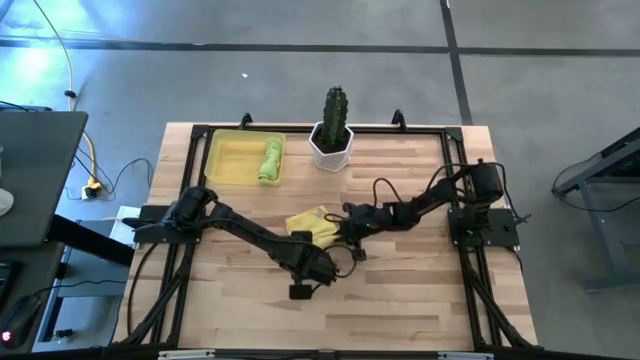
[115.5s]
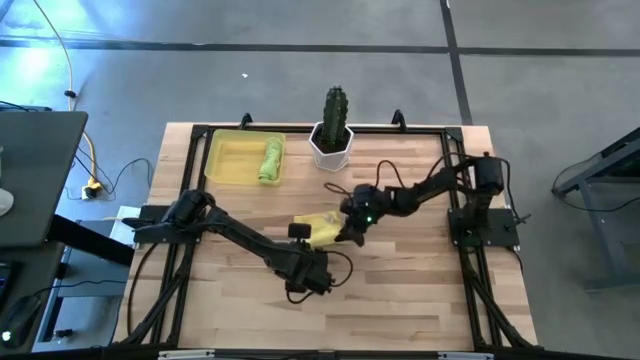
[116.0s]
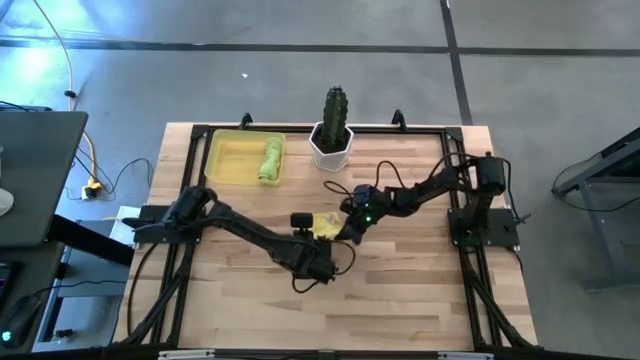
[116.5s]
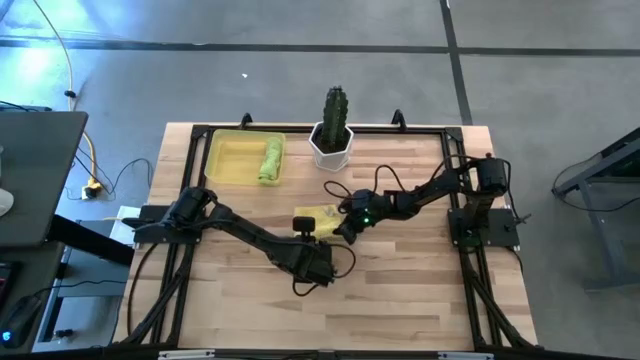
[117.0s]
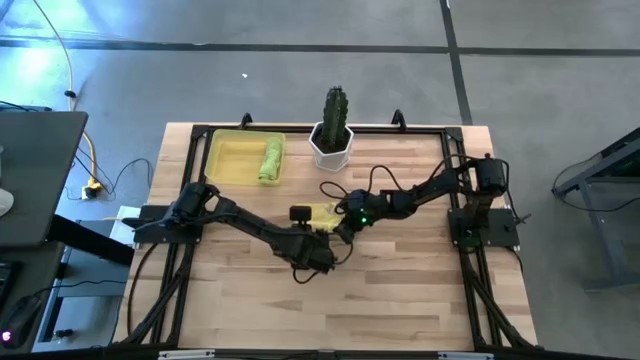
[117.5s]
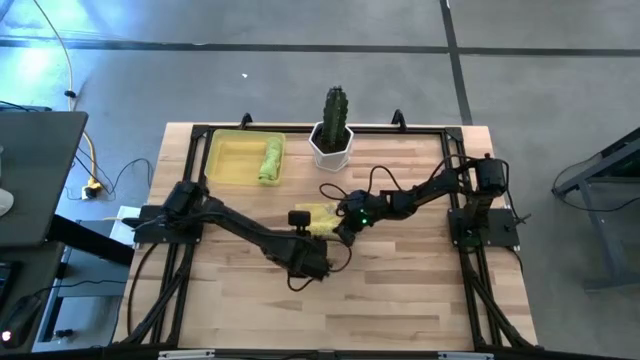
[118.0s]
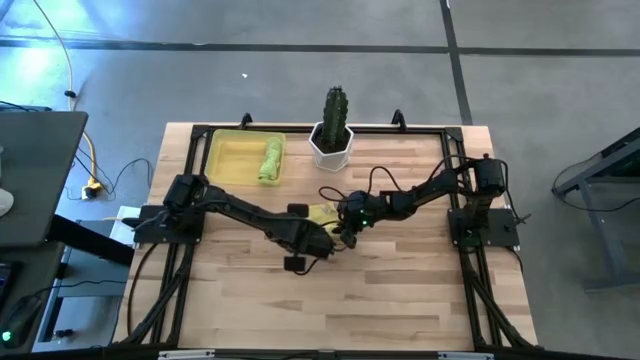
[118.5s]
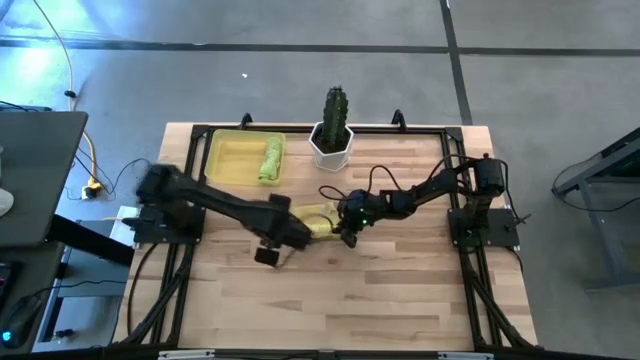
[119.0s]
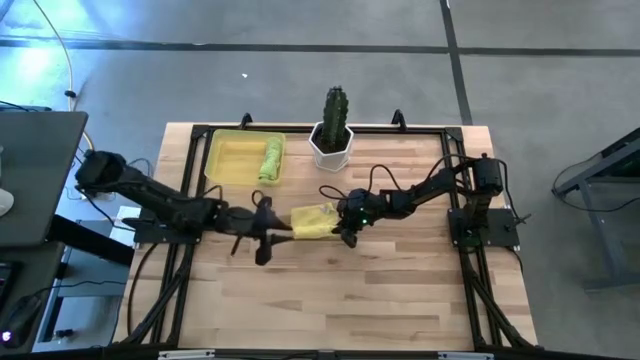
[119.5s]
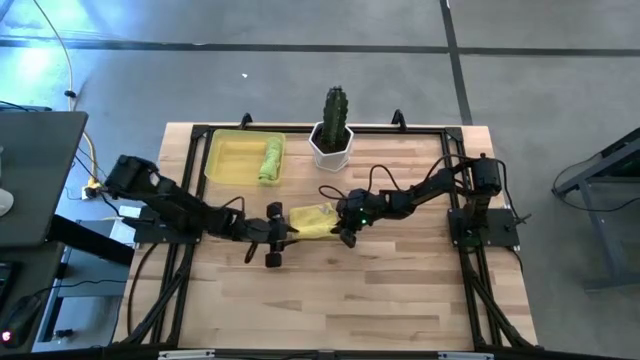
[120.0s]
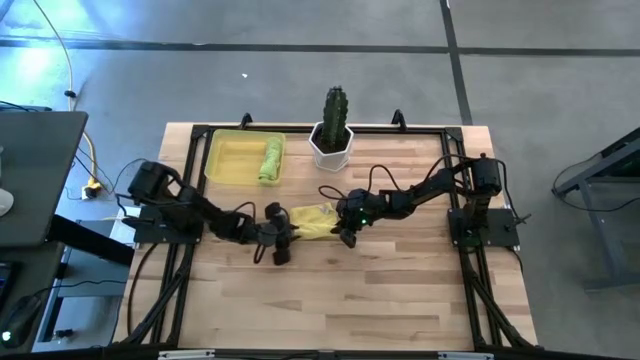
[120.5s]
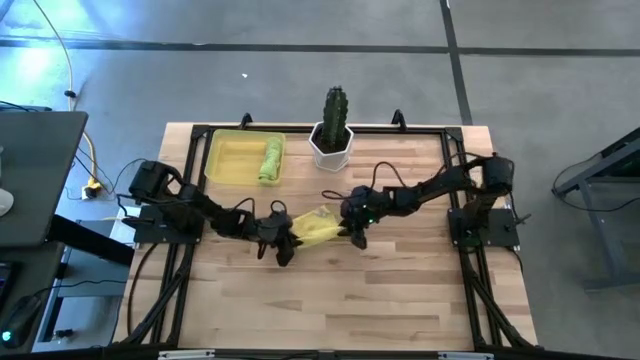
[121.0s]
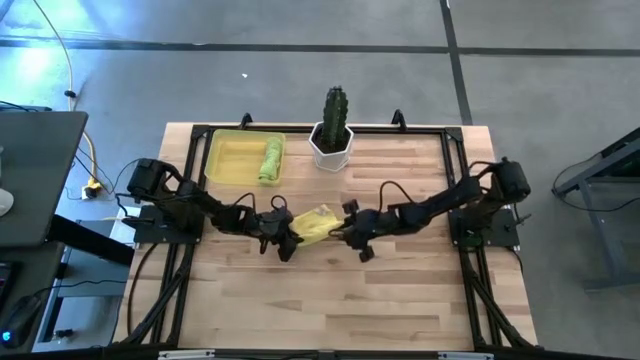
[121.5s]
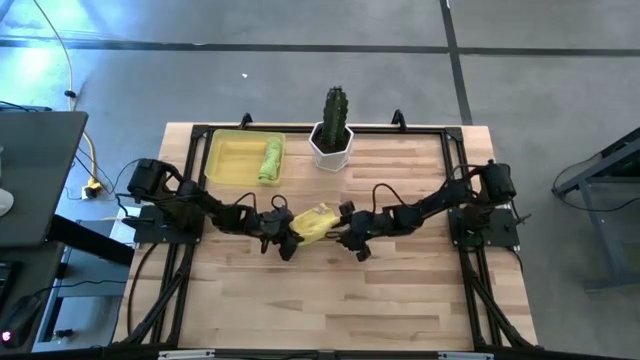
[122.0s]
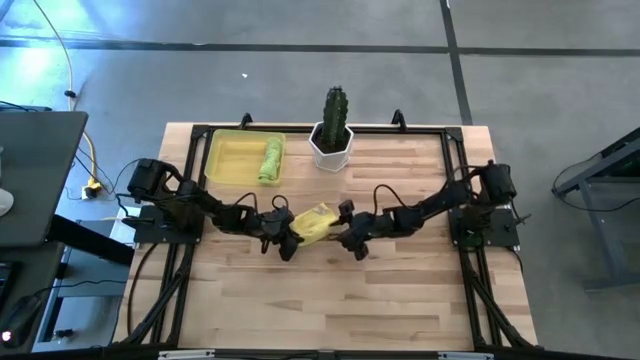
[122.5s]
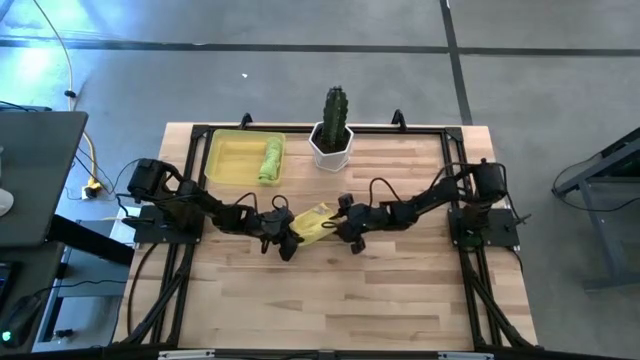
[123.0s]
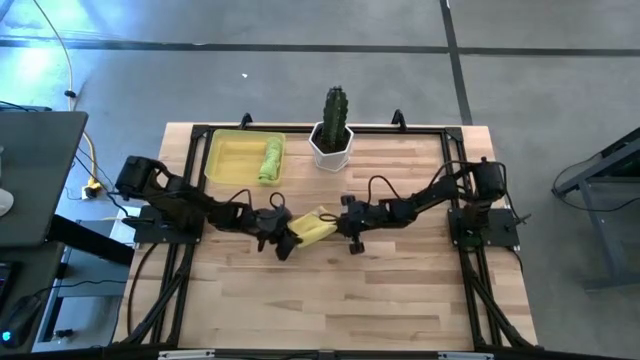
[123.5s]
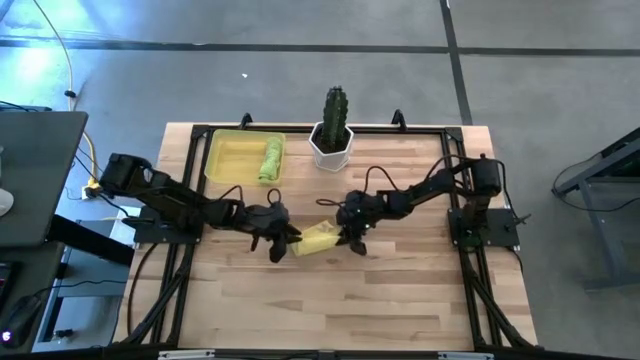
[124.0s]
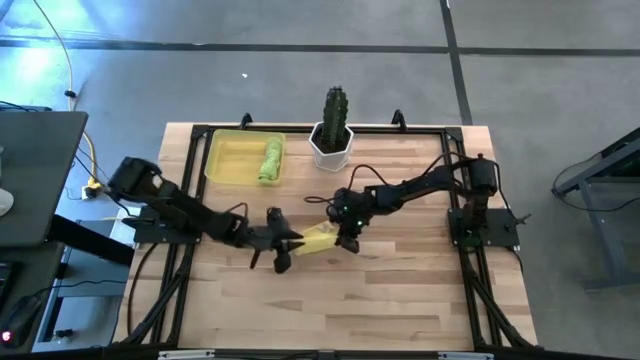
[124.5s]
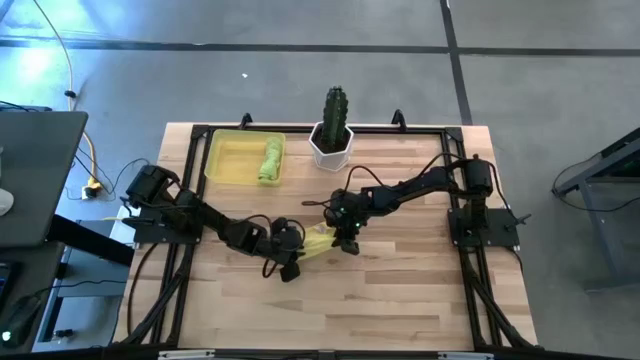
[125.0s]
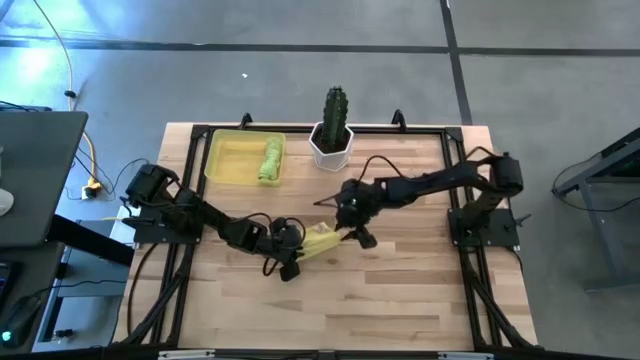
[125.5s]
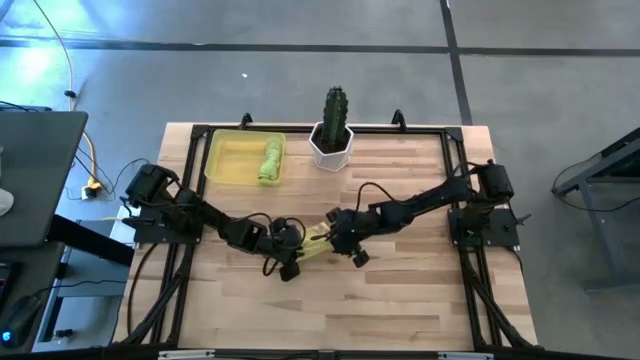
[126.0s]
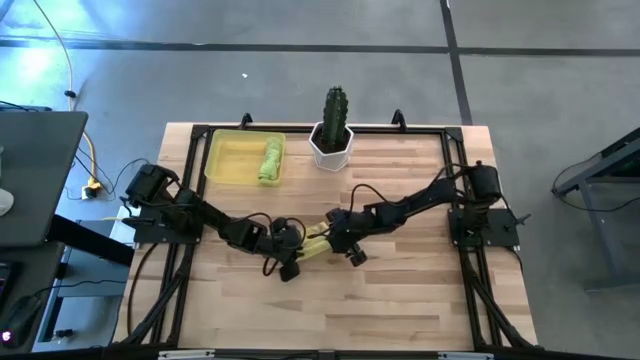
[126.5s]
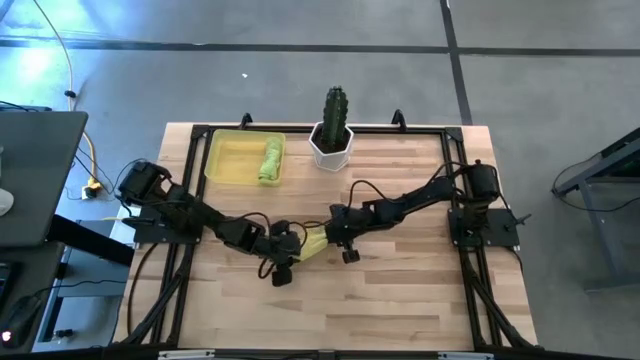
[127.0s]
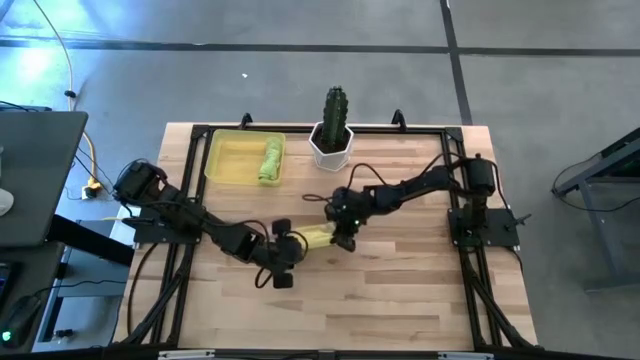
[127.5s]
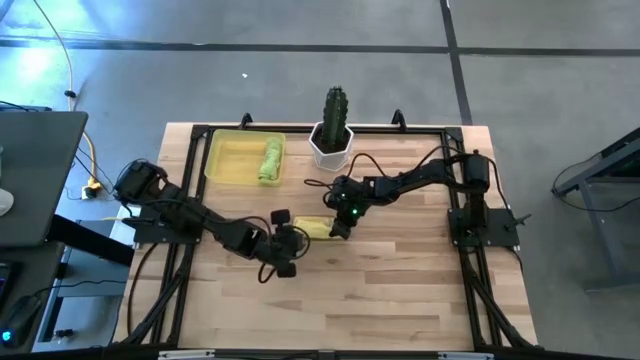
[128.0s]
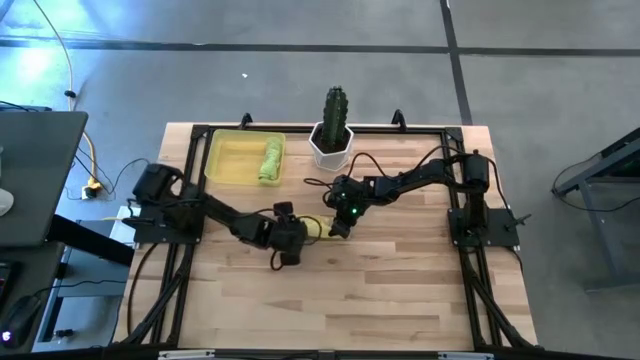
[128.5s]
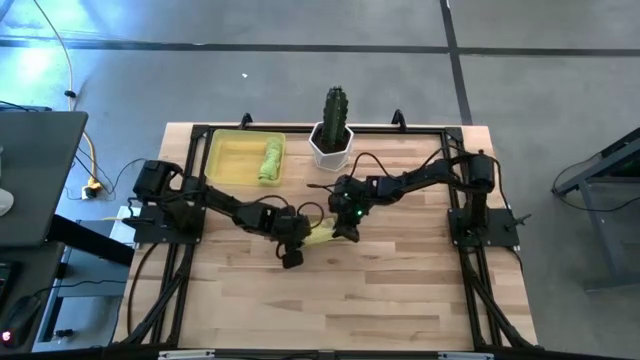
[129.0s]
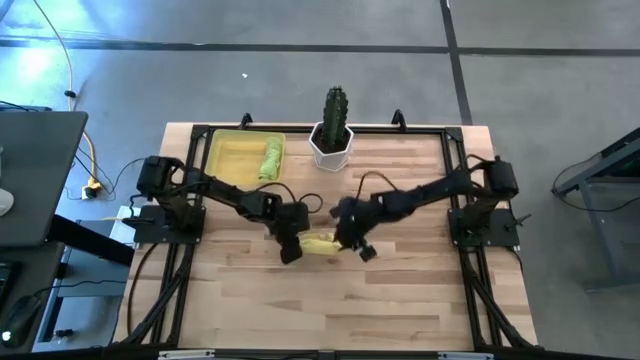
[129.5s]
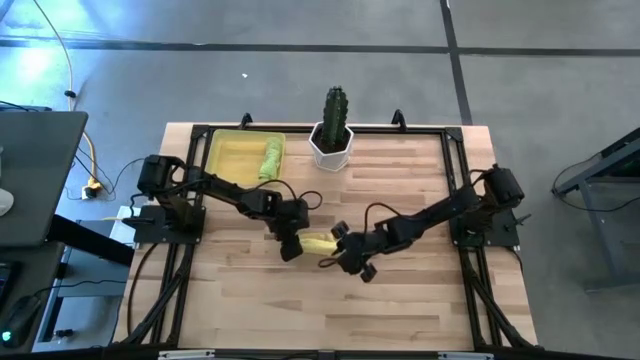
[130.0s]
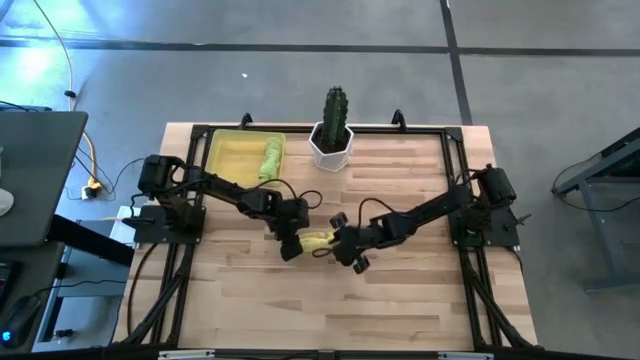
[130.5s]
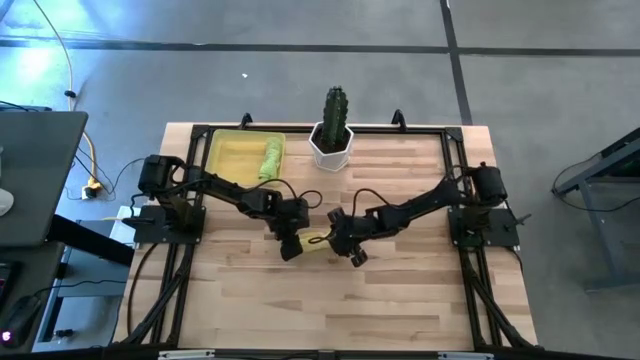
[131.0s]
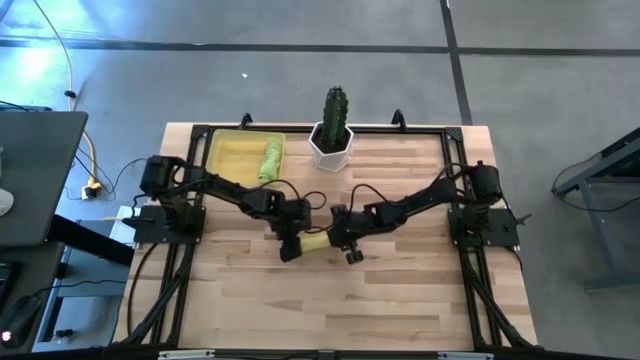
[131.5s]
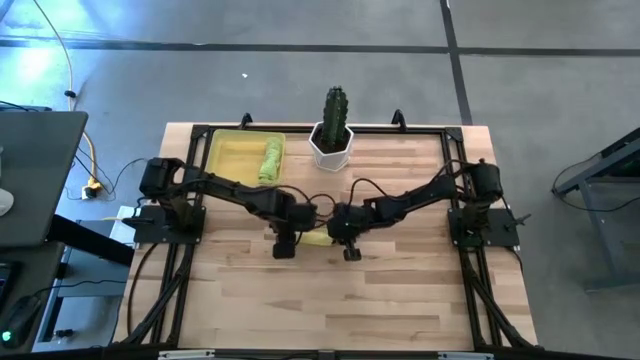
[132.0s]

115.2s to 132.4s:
Task: Roll microfiber towels into tight, uniform cylinder then place into a basket
Roll the yellow microfiber towel

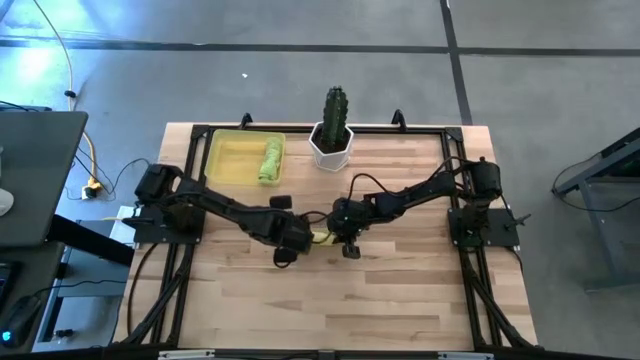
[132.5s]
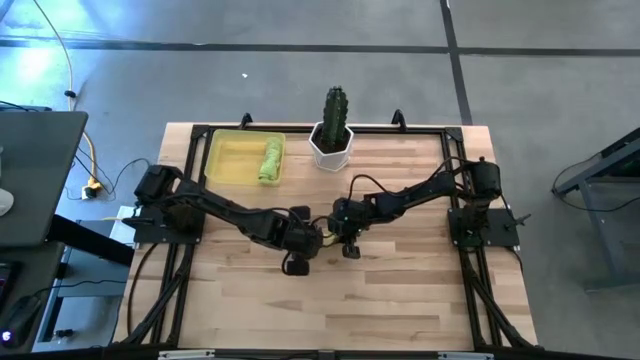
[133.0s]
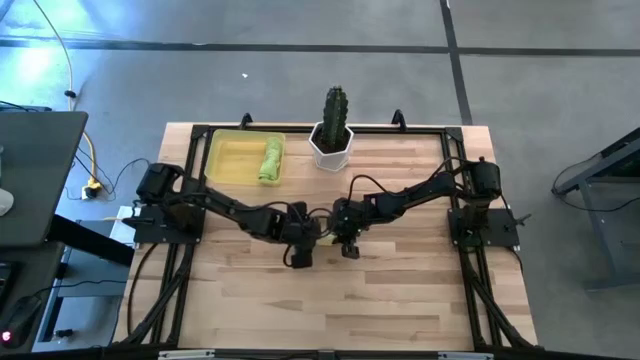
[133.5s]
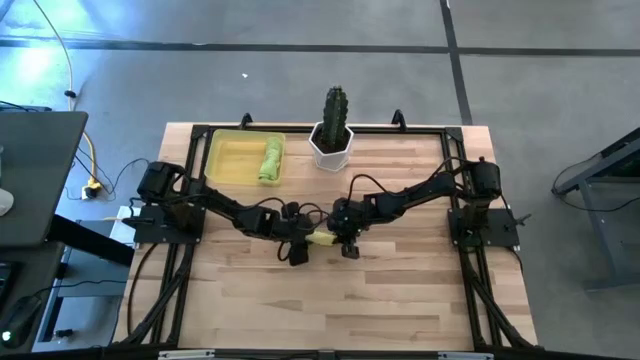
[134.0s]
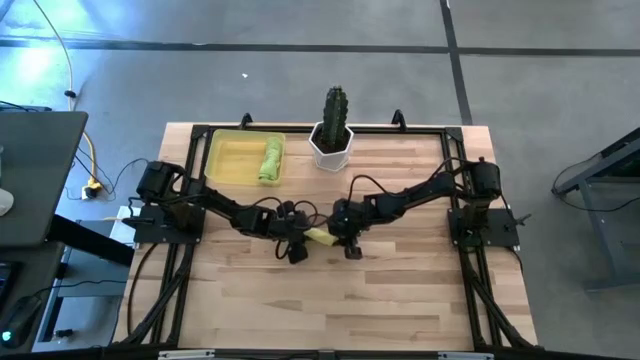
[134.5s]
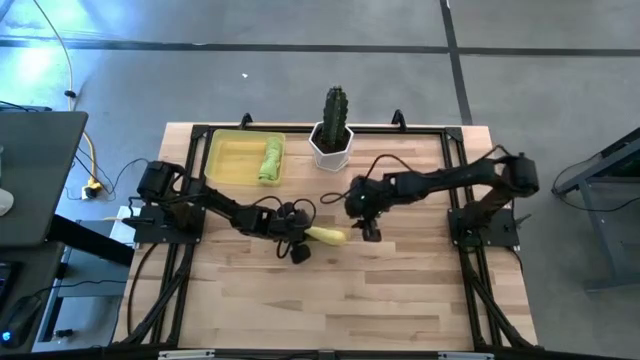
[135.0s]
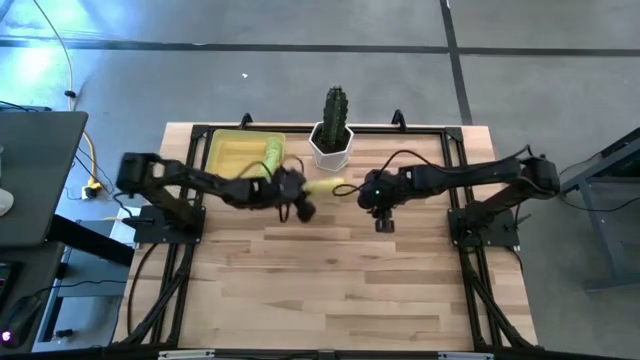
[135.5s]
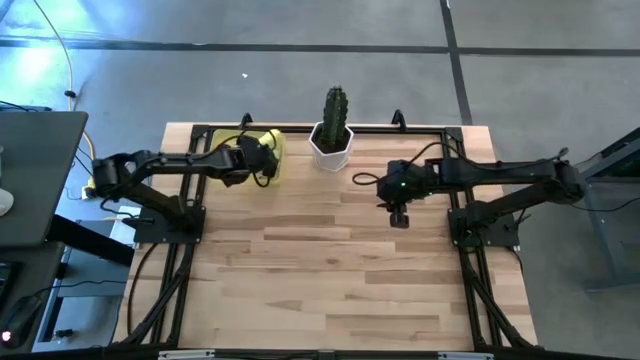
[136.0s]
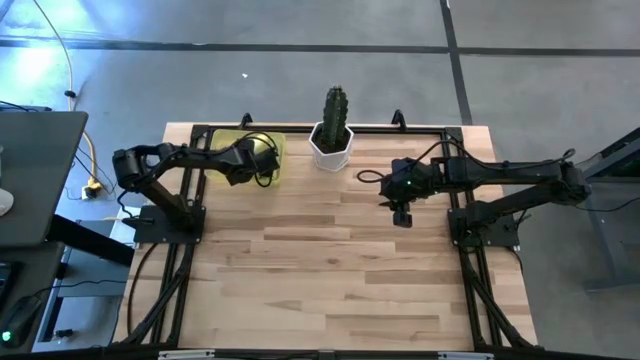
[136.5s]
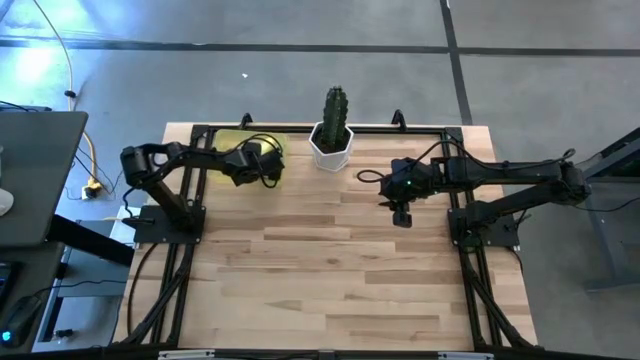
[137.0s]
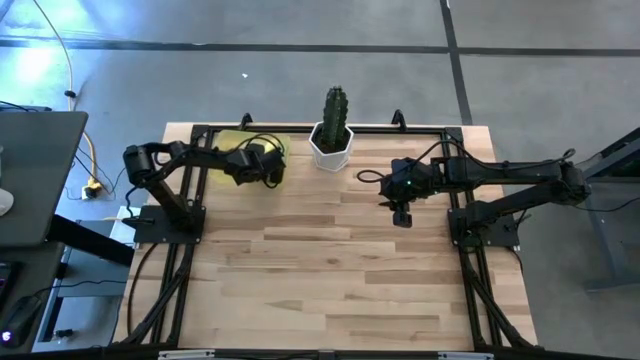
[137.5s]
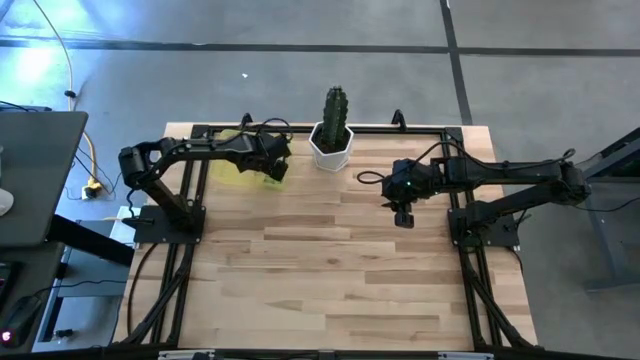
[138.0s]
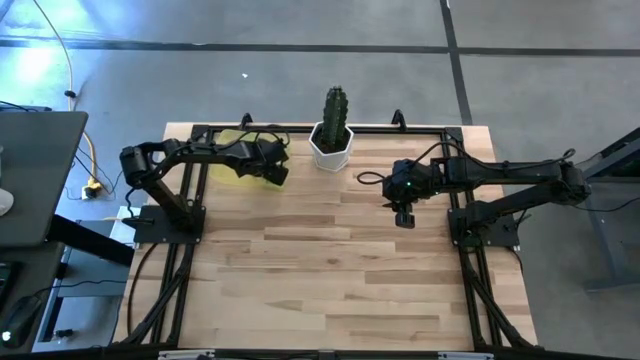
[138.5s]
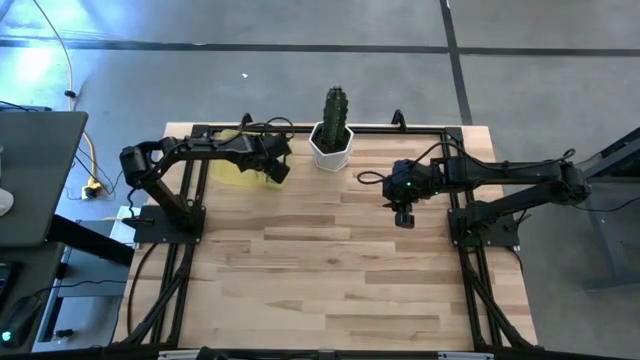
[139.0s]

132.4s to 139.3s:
Put the rolled yellow microfiber towel into the yellow bin
